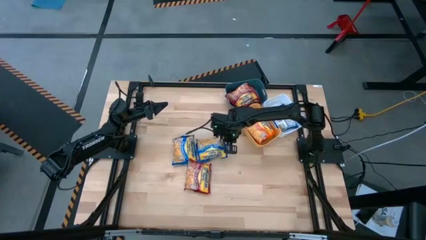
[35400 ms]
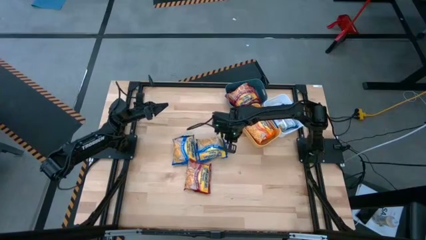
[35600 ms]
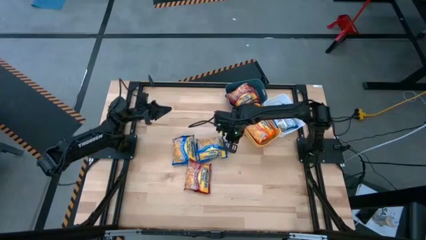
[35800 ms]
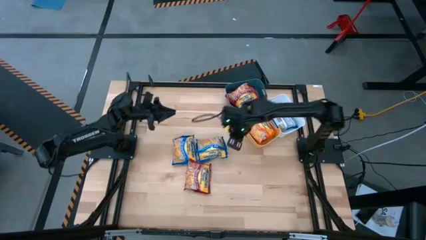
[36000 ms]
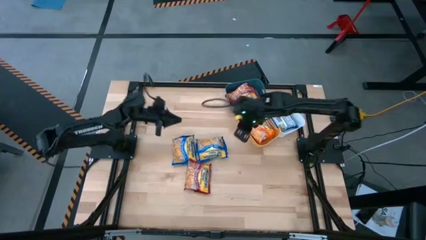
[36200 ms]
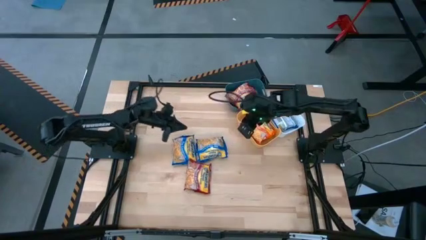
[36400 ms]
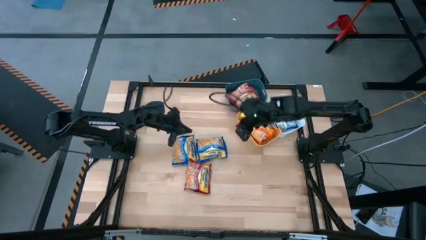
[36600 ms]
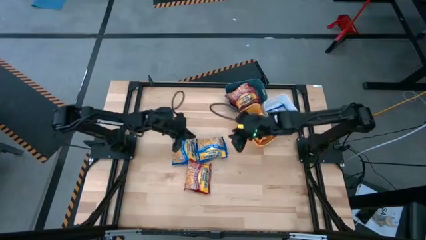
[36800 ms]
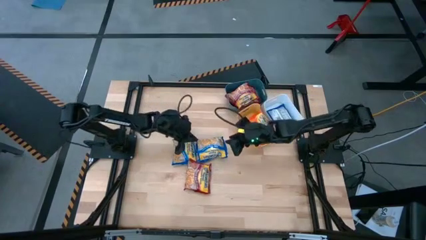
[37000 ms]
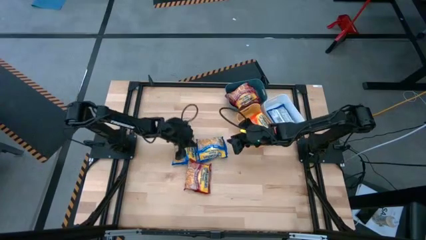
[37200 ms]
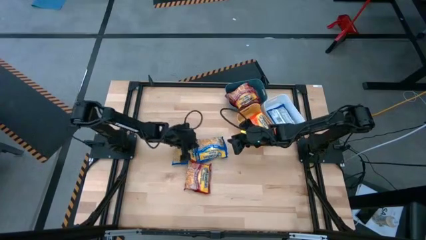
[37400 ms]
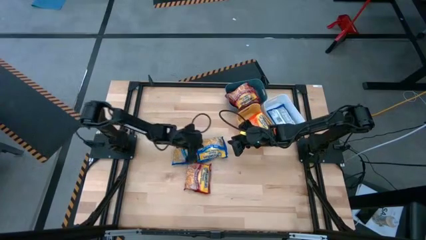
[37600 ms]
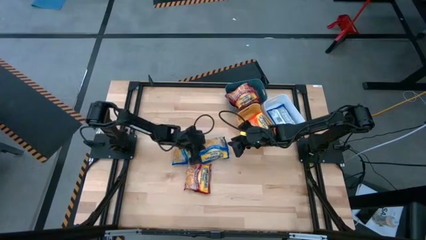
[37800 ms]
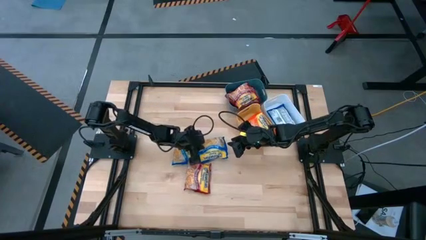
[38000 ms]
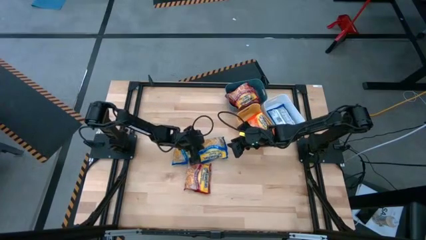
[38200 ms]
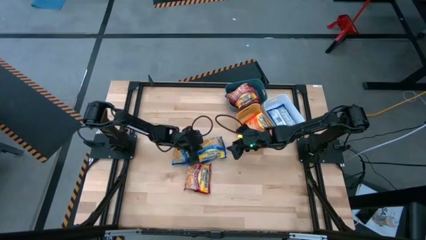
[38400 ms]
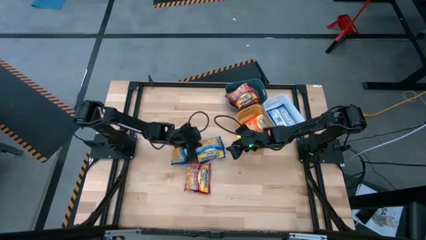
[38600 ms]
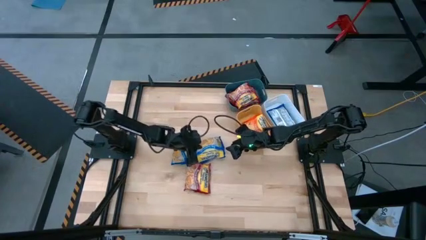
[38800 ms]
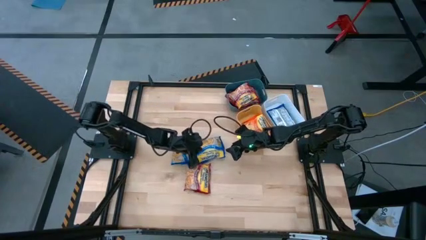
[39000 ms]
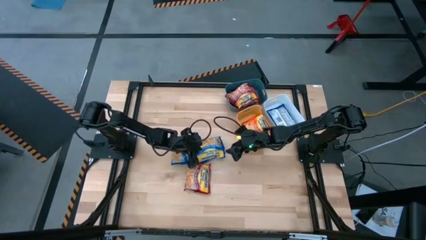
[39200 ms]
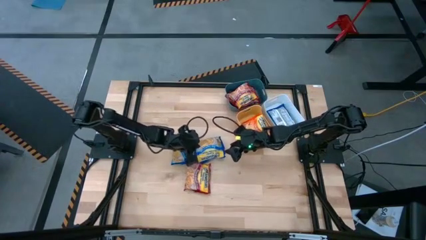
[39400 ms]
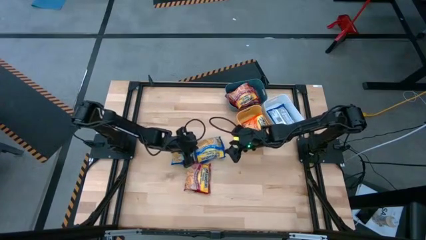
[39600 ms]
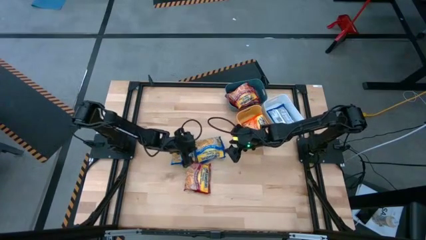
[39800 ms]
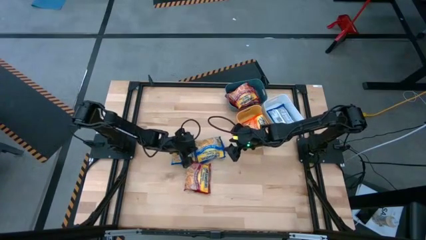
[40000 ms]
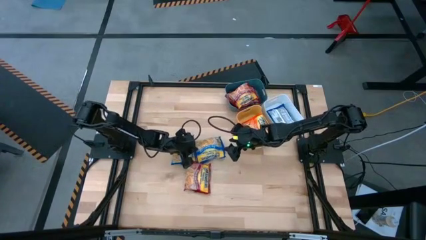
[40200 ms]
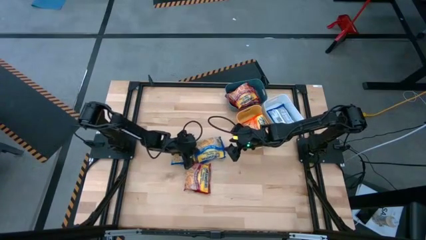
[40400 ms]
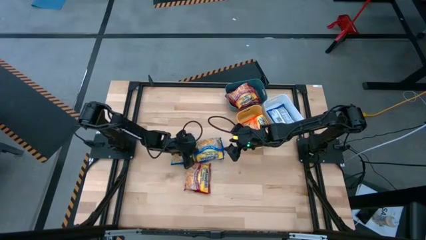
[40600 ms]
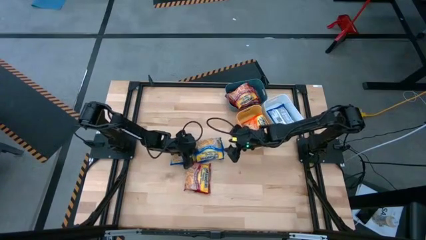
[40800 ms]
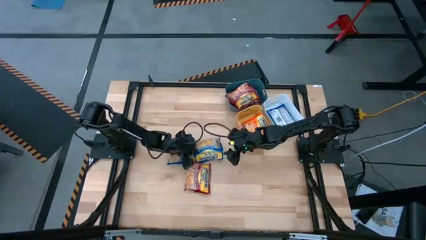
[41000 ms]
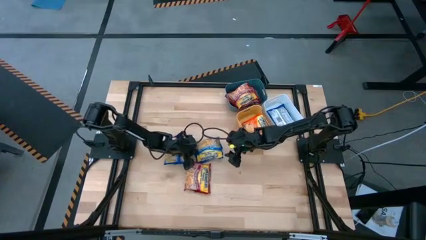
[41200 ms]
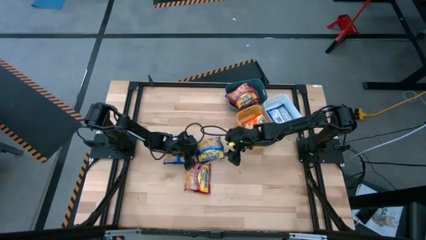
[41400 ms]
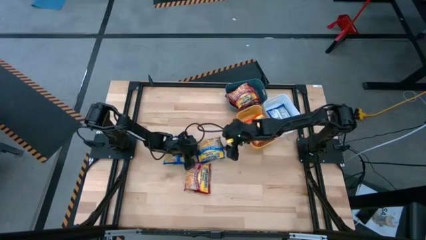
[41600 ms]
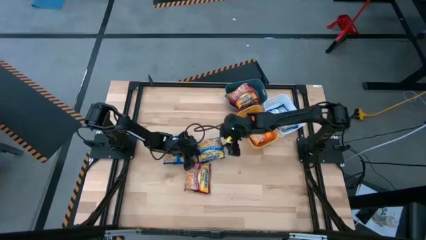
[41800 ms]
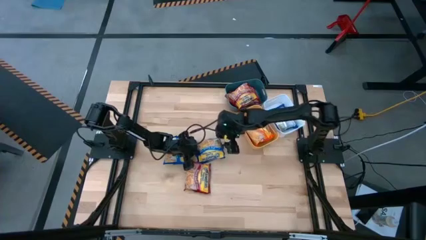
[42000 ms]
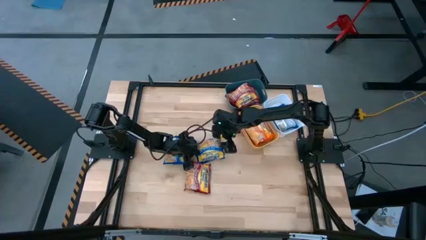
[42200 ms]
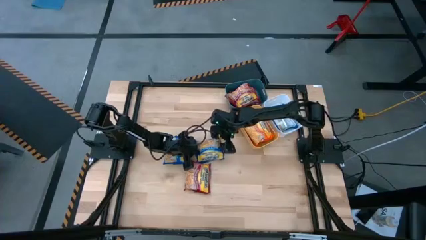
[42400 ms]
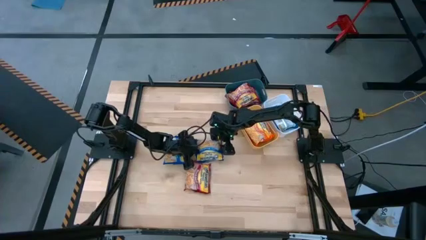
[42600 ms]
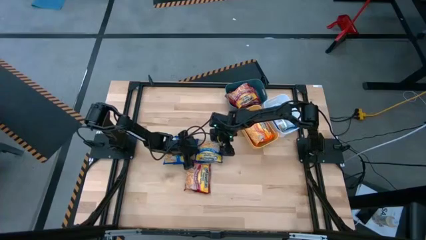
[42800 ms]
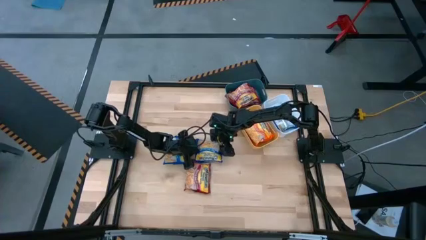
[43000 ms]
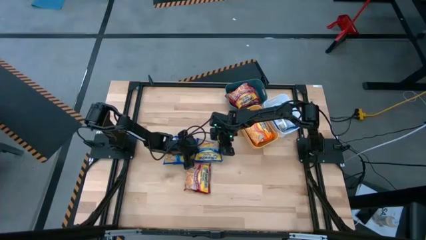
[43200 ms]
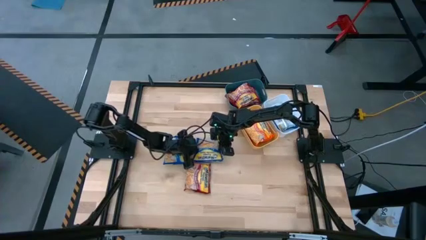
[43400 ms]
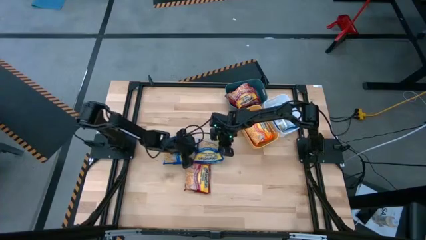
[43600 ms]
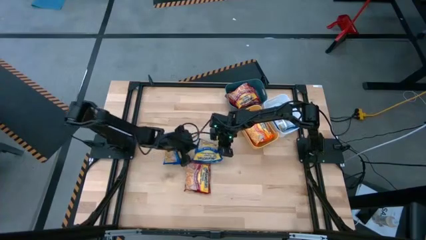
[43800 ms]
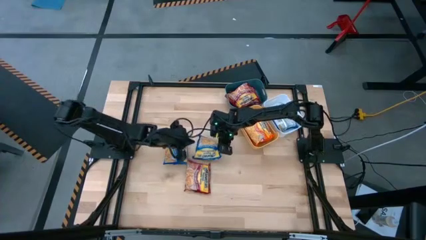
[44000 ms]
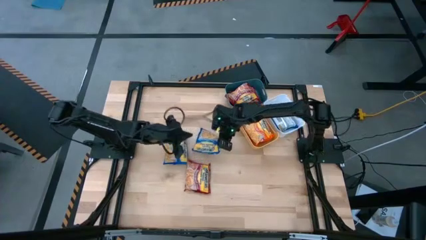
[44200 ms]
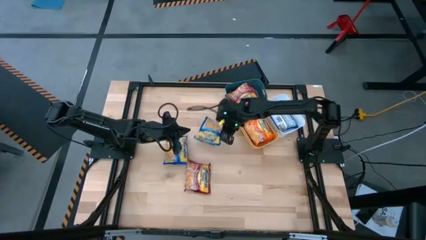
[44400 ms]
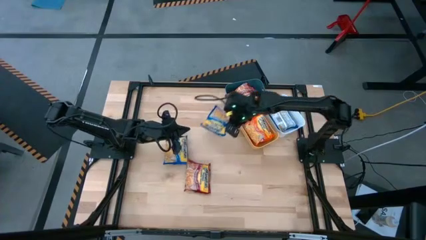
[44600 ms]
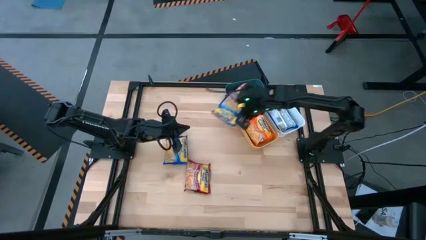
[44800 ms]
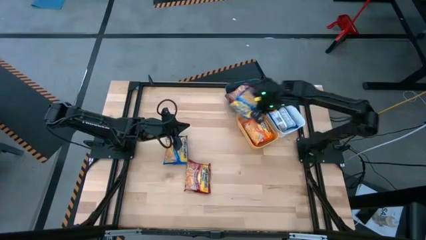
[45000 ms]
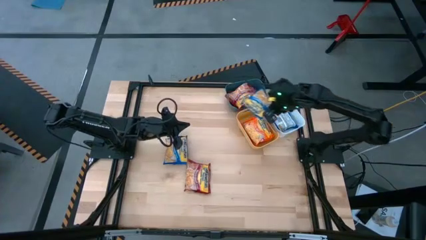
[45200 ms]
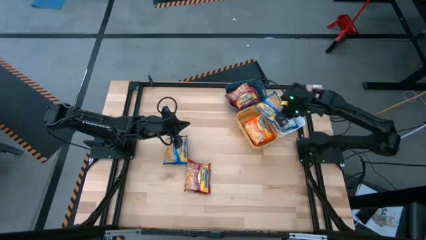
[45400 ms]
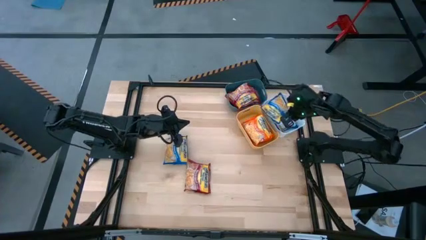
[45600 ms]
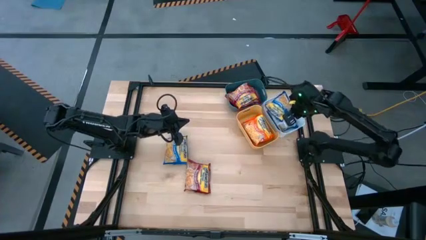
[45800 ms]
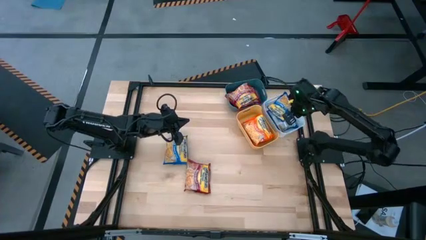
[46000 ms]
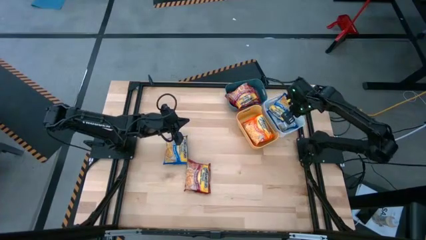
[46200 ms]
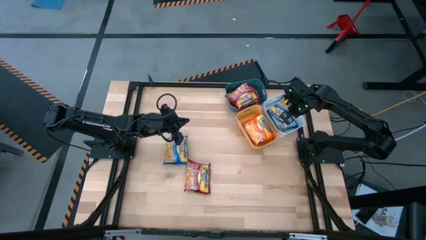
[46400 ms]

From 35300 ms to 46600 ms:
Task: Sort Maruchan noodles
Put the right blue noodle pack into the white bin

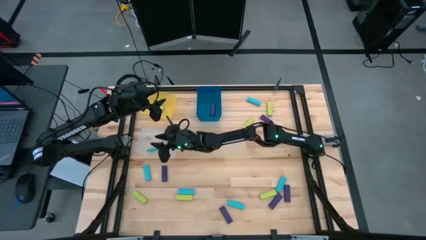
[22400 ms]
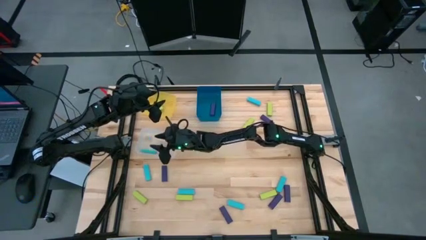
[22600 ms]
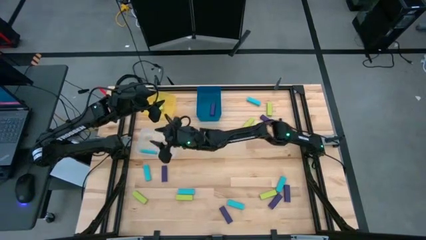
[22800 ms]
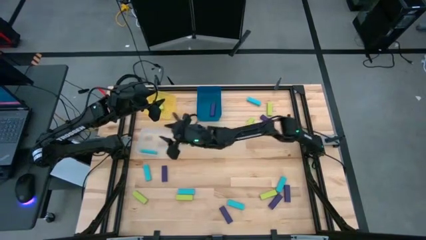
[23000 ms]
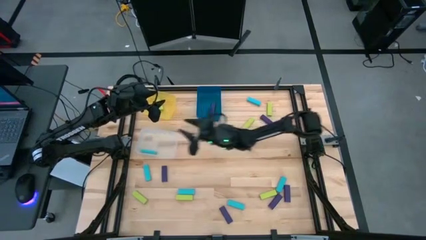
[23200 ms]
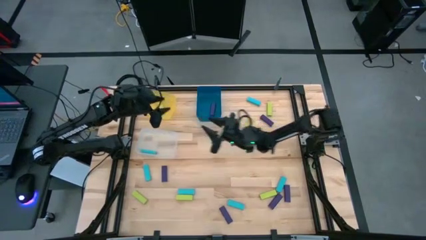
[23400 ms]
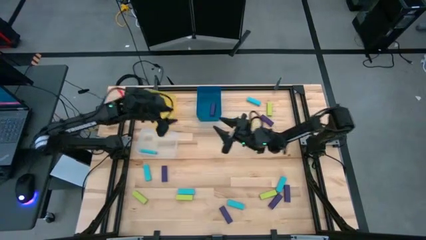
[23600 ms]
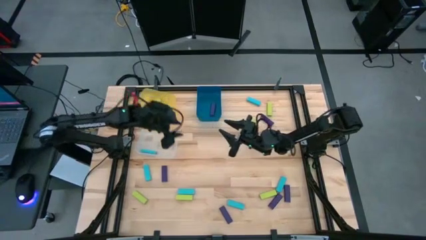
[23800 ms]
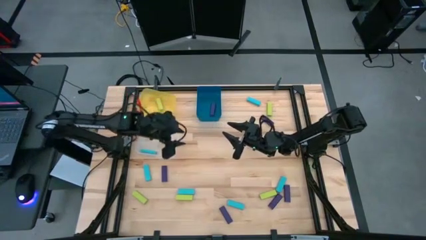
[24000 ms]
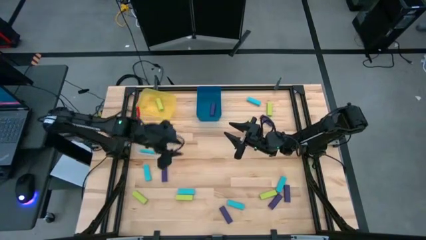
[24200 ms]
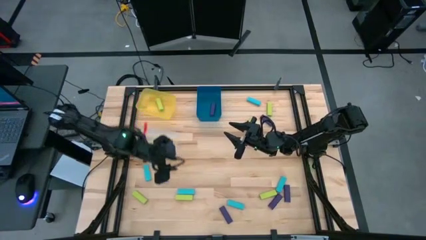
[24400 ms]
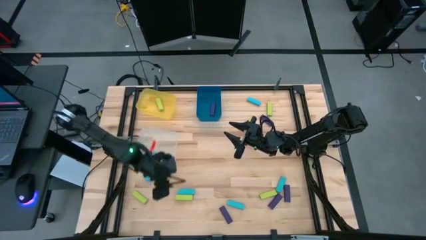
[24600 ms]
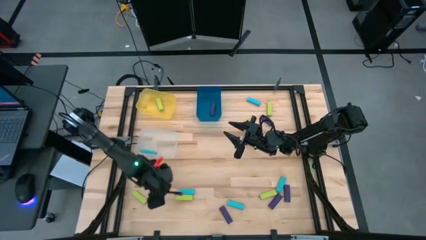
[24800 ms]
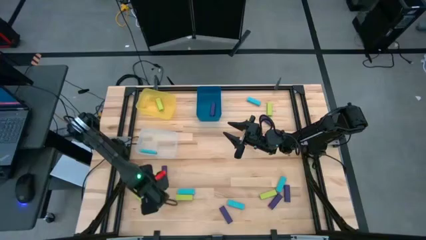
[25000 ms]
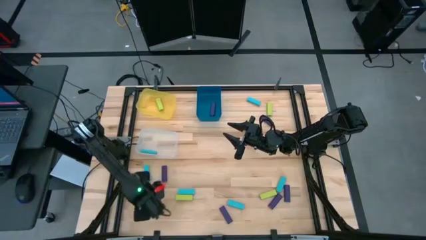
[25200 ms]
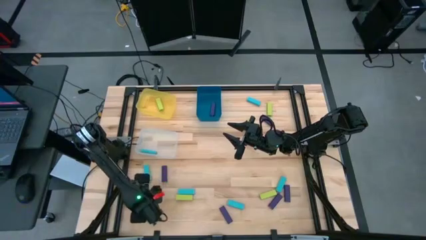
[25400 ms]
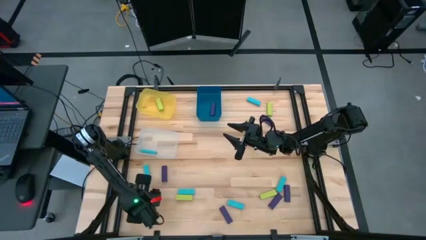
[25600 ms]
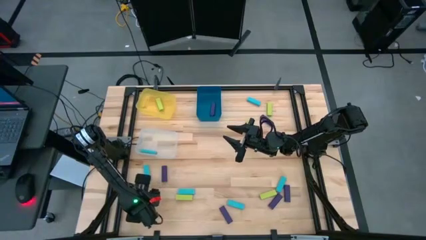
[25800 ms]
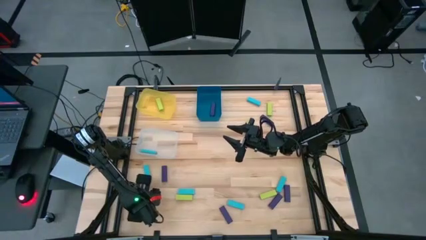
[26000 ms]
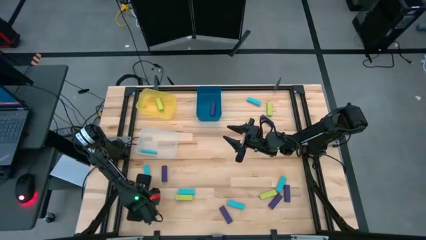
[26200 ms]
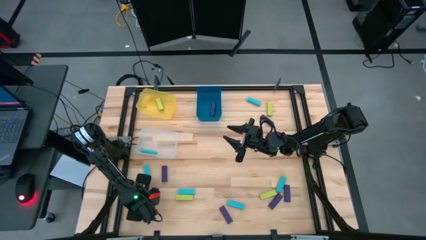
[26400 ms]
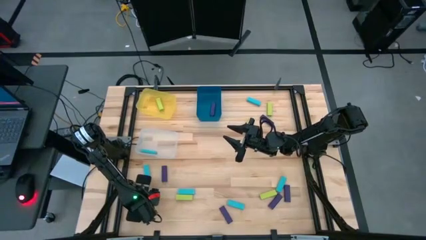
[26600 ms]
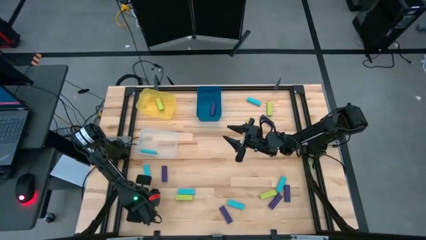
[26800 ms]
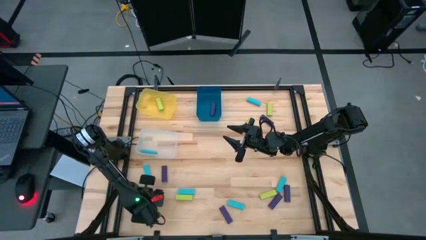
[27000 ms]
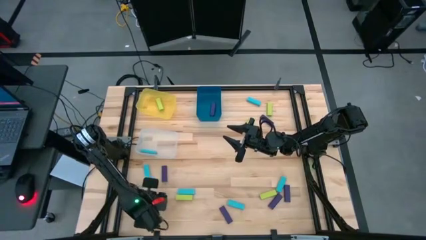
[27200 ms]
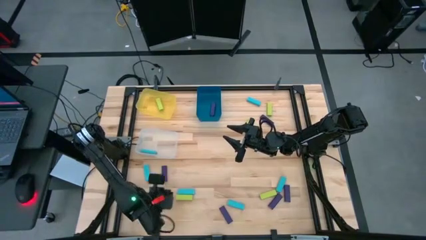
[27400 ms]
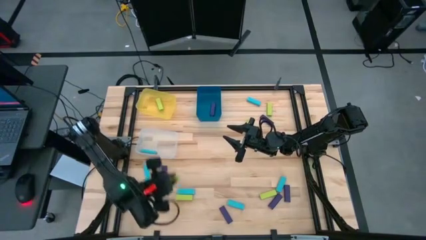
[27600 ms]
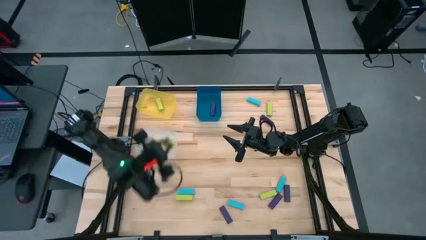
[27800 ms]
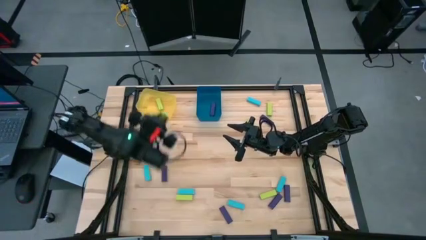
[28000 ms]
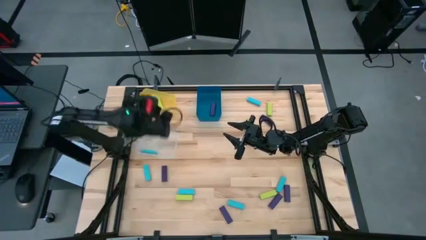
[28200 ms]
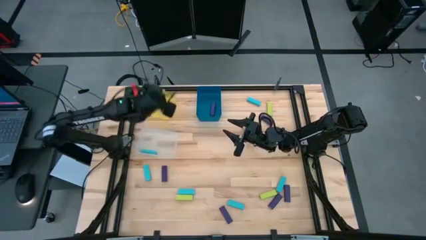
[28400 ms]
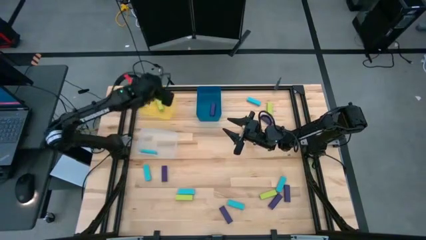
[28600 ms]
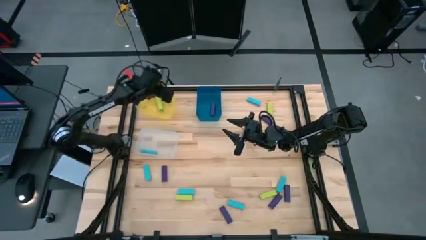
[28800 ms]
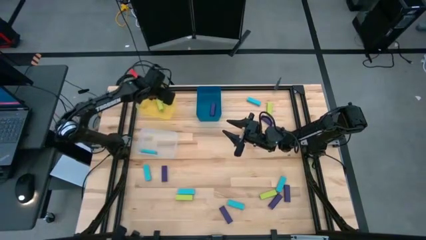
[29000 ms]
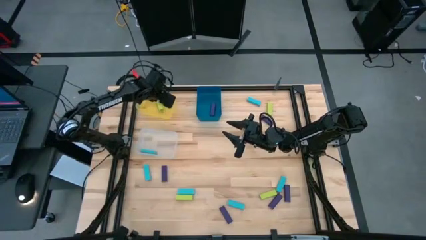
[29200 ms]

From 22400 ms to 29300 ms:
Task: Sort blocks
Put the green block into the yellow bin
